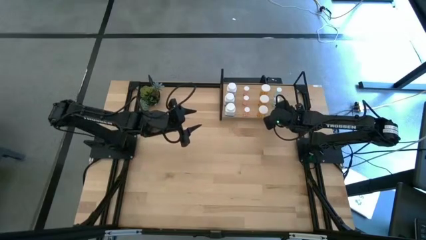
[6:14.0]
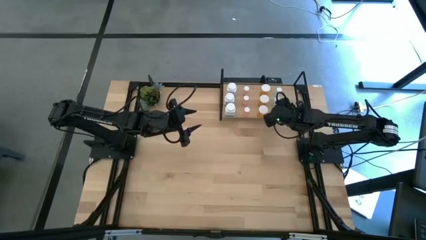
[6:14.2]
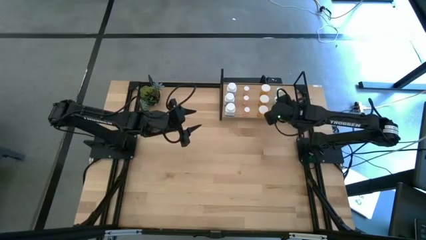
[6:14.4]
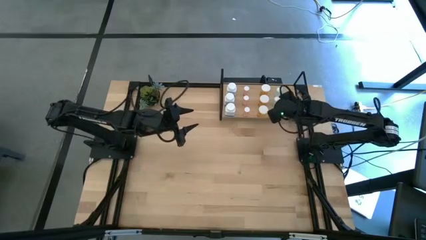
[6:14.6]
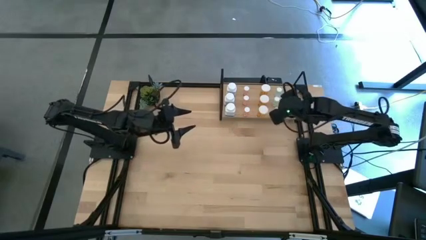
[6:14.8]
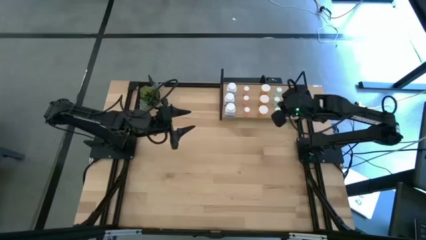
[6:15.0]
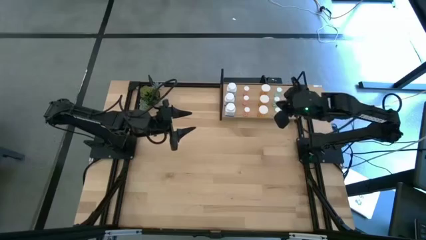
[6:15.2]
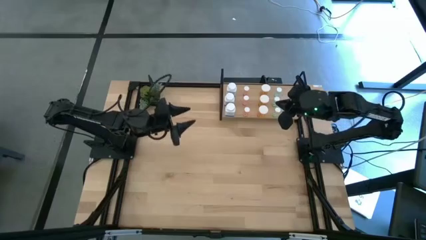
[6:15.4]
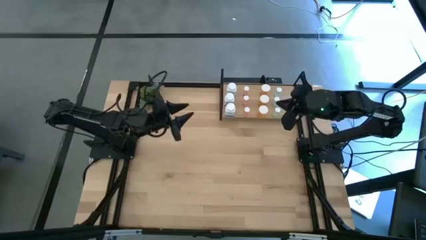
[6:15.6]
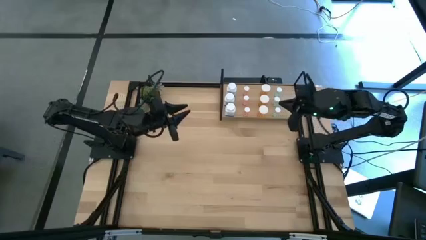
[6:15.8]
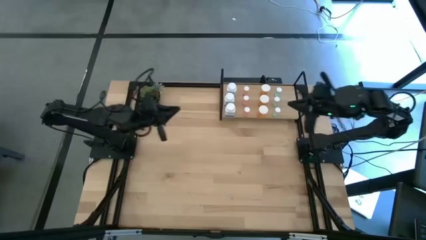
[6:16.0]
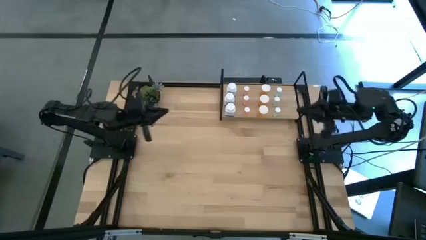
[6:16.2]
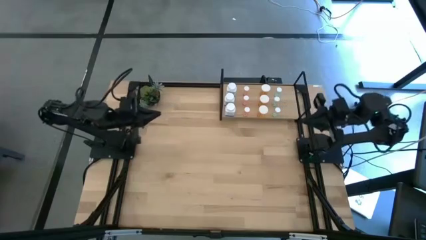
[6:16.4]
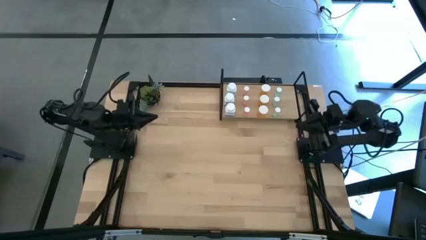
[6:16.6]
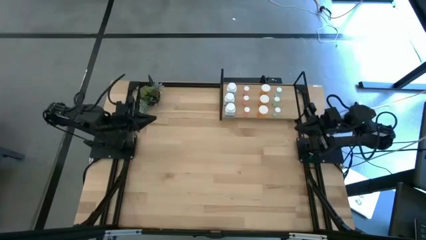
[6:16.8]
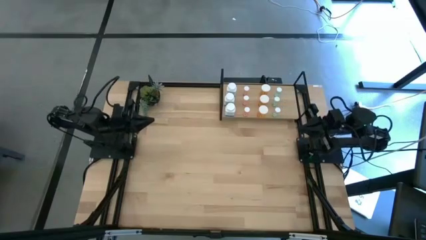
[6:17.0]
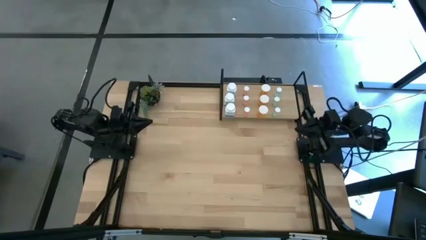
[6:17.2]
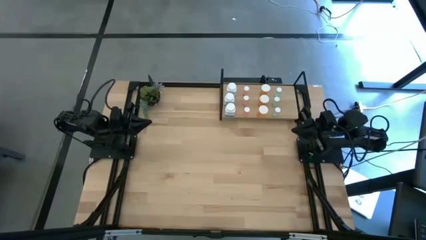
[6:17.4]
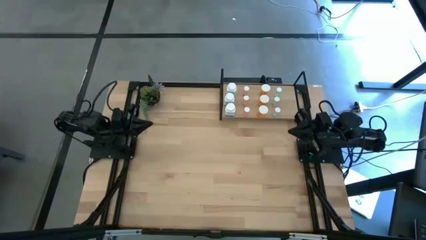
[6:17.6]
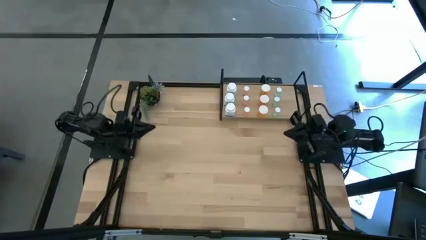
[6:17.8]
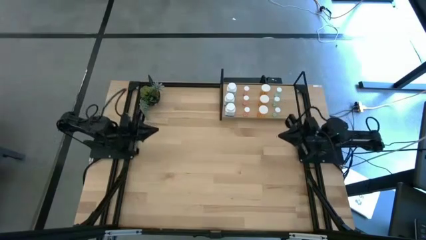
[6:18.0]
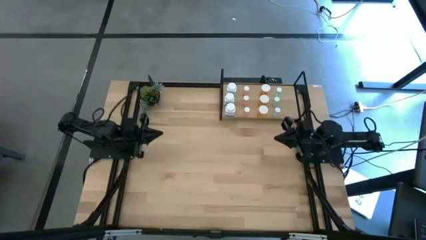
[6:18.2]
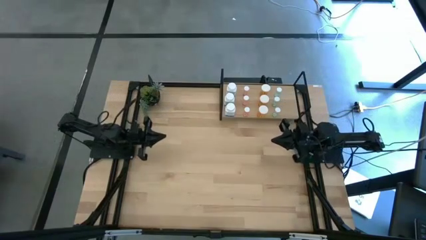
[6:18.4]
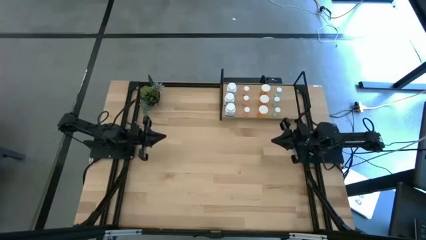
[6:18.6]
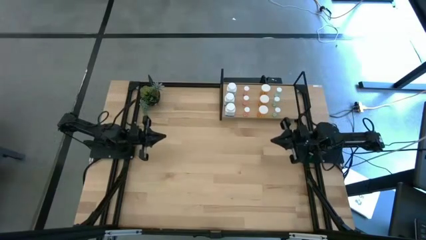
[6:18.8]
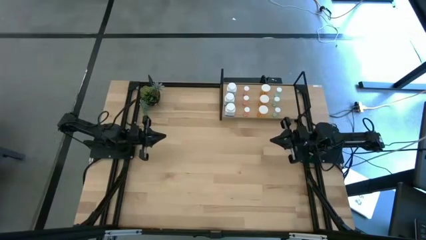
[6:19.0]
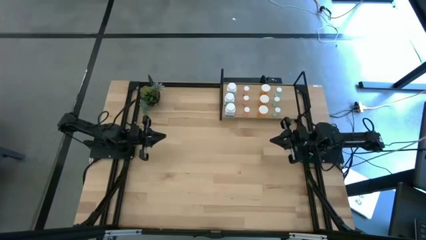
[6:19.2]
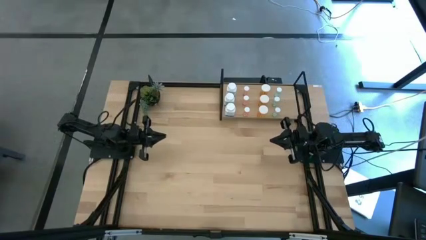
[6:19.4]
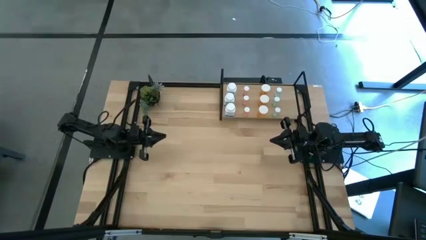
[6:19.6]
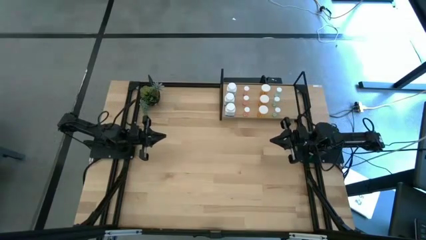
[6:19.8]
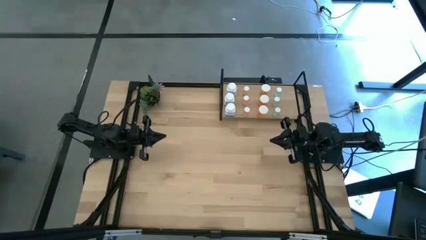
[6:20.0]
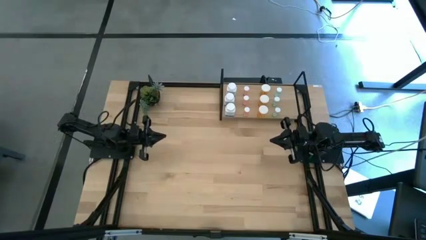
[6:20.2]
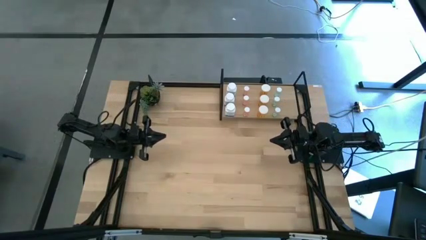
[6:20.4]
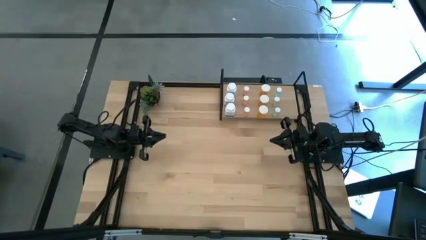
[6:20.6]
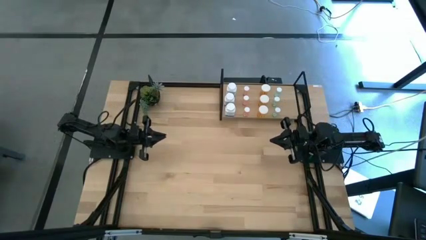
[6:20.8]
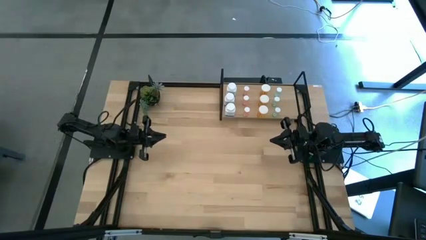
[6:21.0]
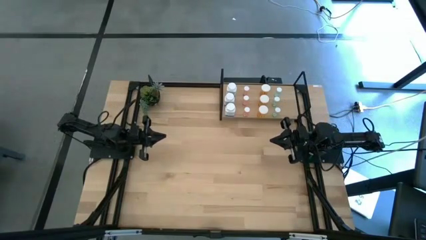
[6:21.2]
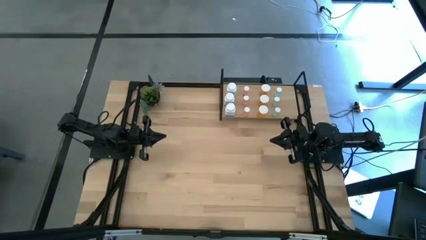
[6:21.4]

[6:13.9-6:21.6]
Task: Pick and place medicine bottles onto shelf by color
Return to Home Position

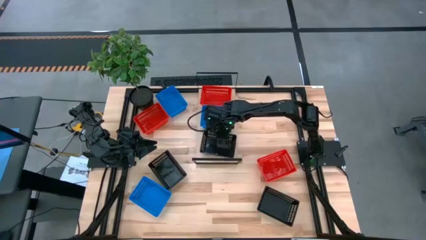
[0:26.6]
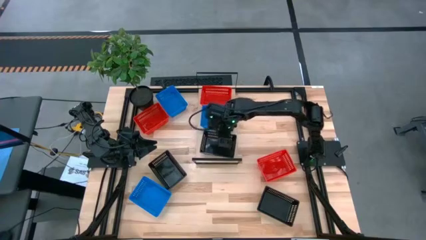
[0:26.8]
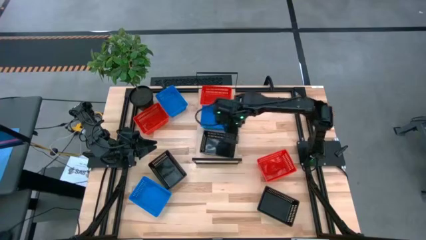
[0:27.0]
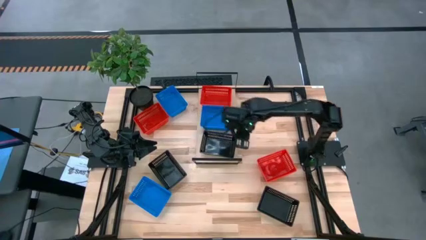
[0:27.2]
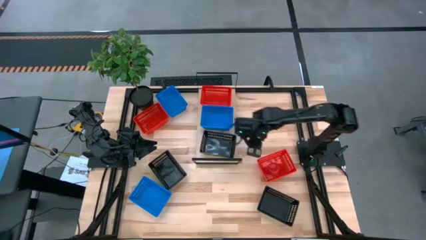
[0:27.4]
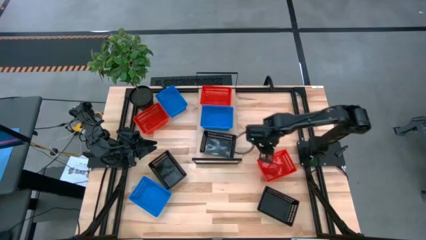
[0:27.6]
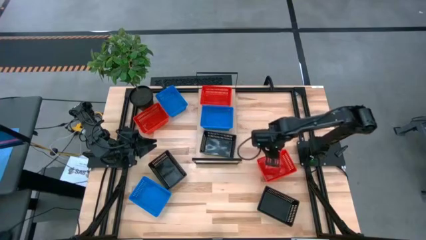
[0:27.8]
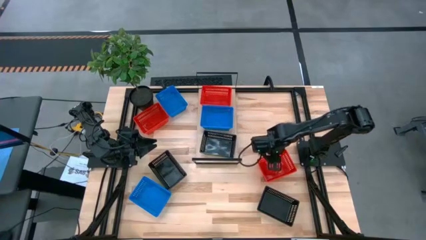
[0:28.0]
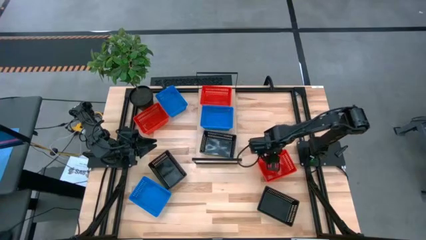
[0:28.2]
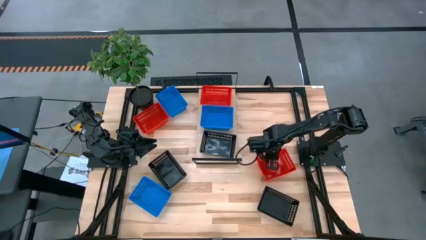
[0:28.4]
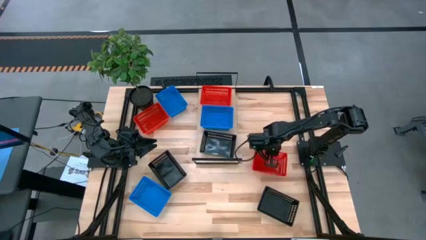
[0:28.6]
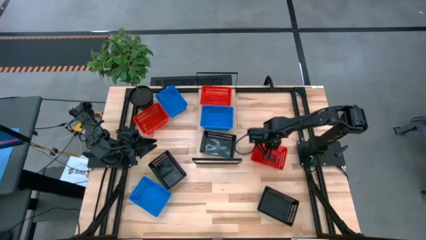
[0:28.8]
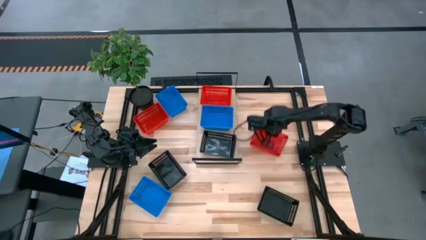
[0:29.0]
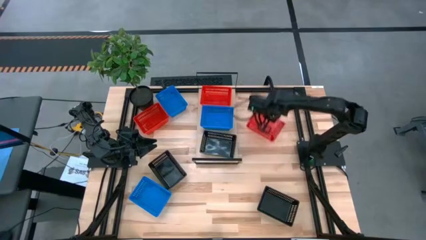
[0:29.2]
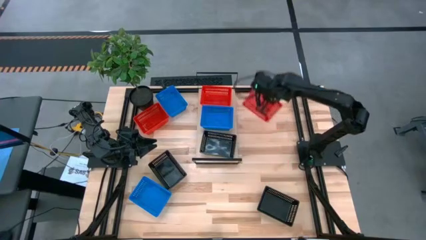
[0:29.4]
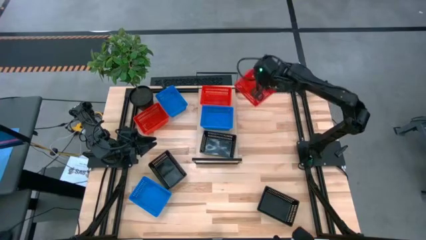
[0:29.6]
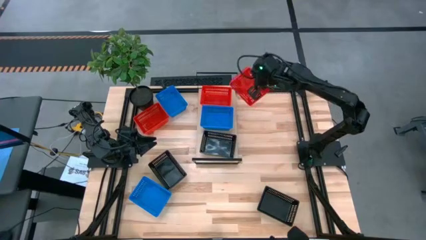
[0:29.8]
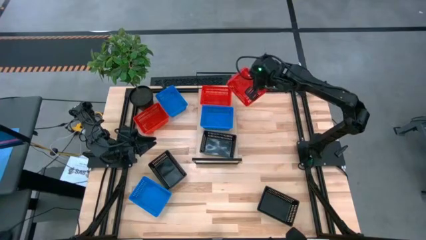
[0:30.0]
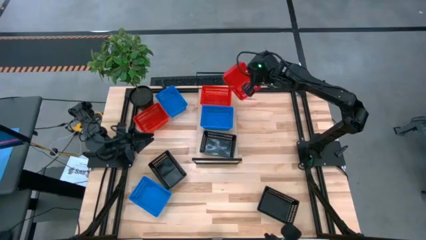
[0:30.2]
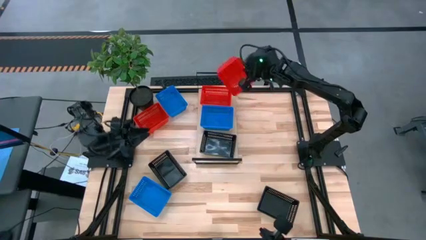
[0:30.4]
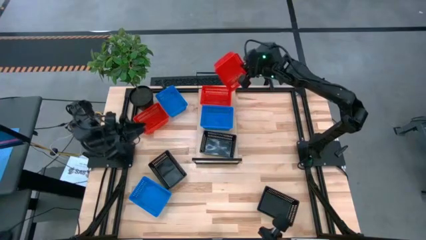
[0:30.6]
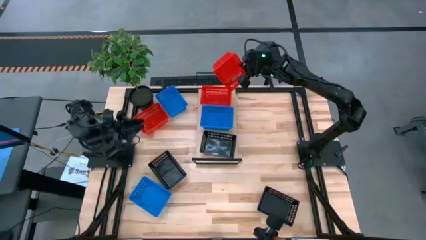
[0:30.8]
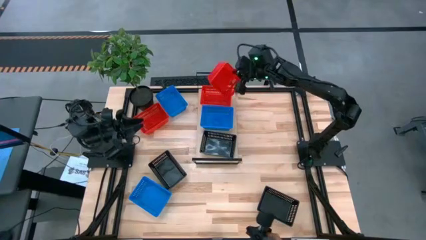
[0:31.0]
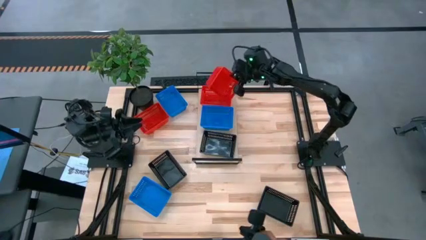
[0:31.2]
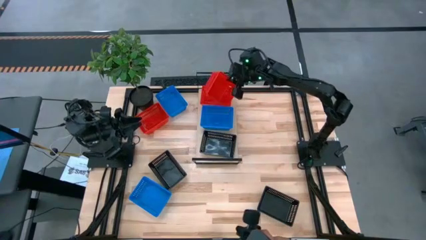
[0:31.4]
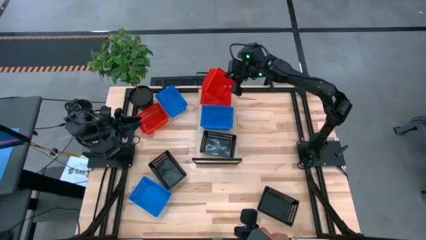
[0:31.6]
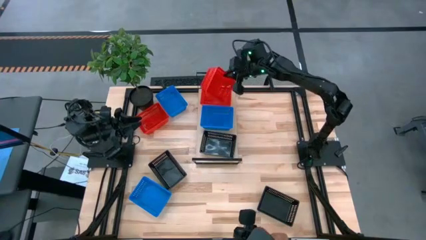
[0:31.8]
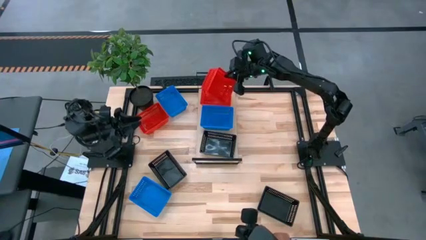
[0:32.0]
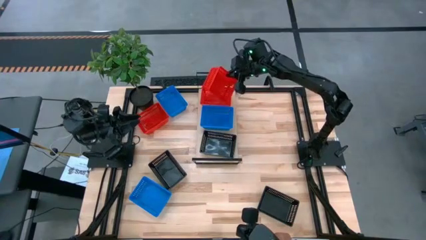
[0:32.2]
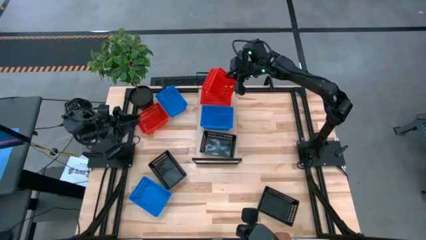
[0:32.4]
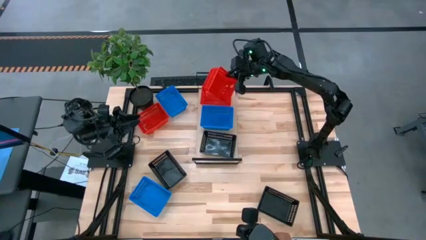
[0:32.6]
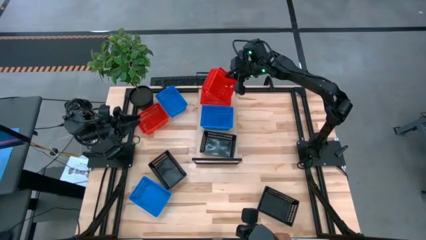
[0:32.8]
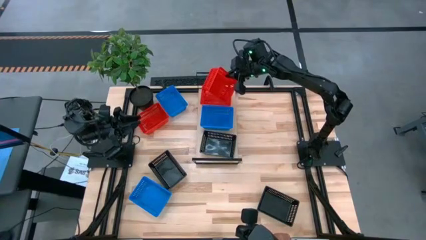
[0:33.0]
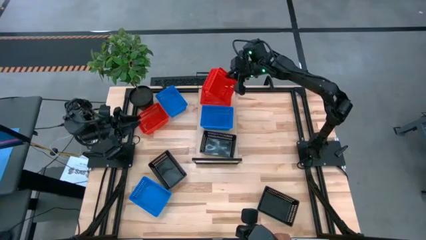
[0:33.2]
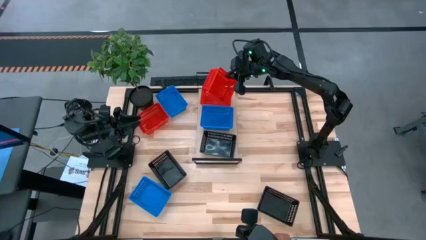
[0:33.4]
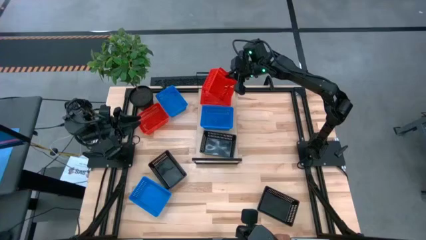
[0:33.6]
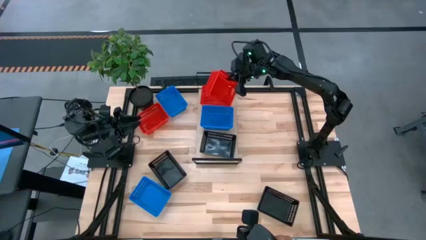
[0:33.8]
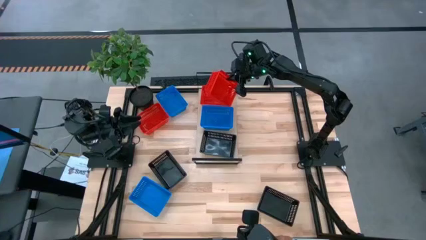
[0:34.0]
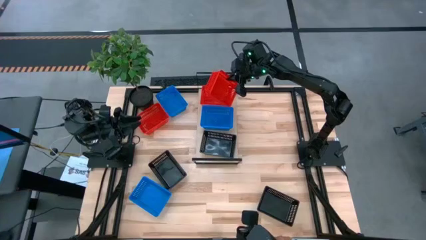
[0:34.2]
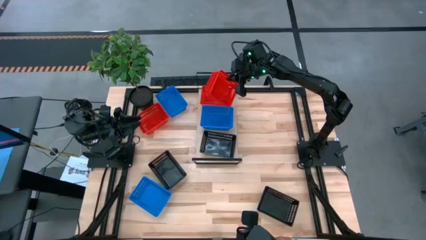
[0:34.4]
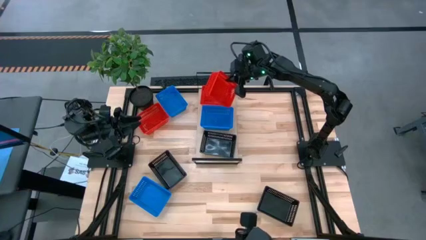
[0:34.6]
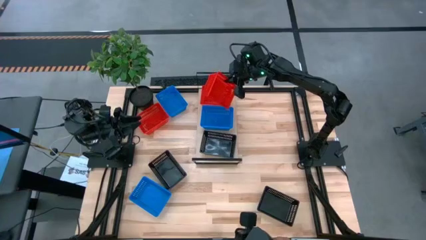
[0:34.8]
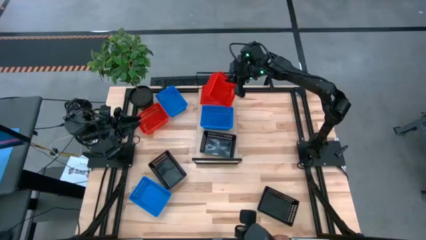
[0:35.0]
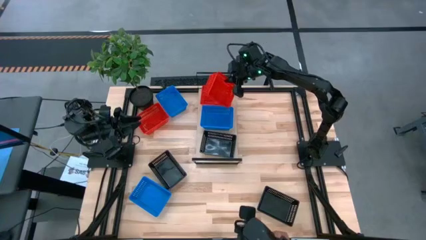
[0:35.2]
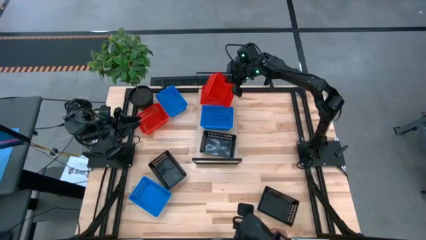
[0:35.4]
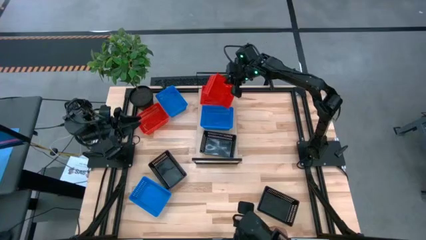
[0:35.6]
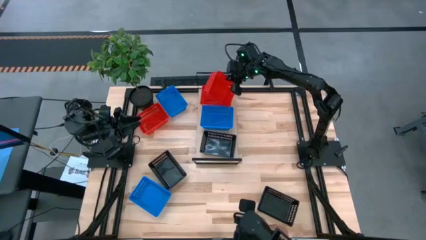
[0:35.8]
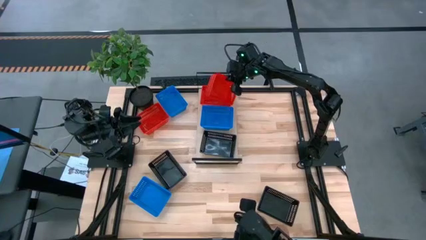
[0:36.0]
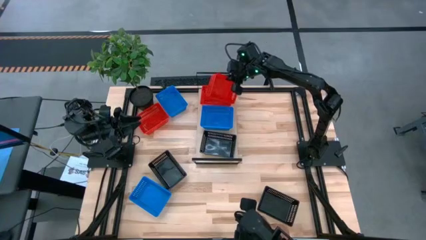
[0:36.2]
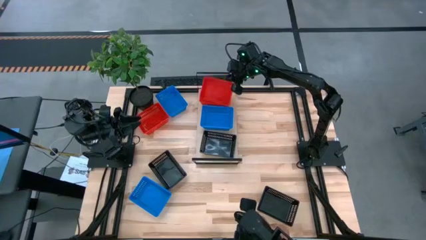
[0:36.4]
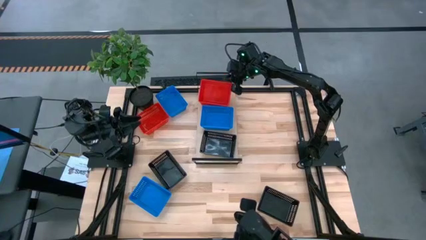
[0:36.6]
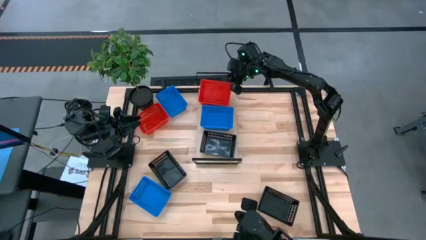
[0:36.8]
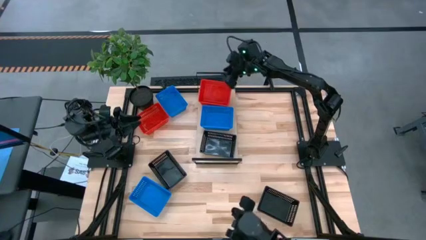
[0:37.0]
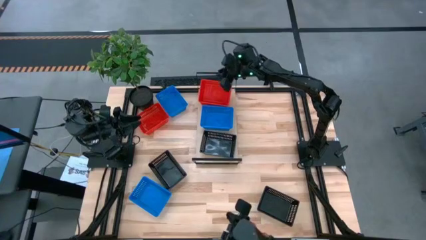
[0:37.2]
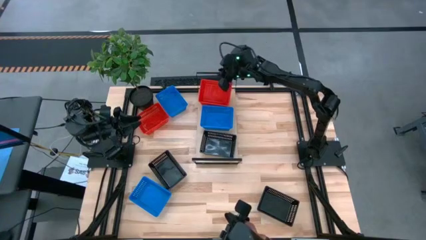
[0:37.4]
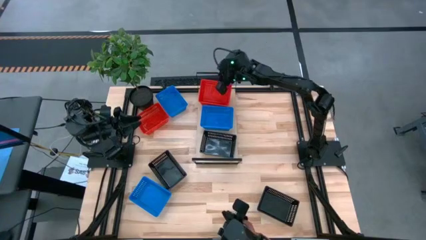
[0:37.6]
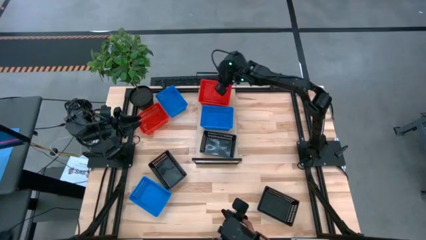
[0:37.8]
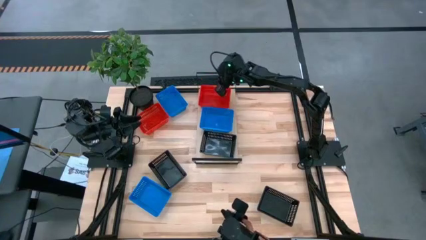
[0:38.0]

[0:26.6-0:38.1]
Task: Stack baskets on shelf by color
Stack the bottom red bin on the red bin on the shelf
